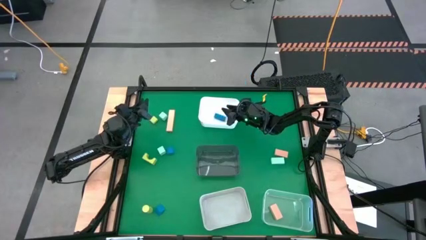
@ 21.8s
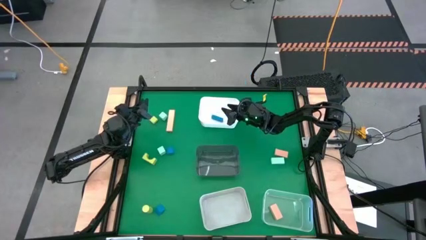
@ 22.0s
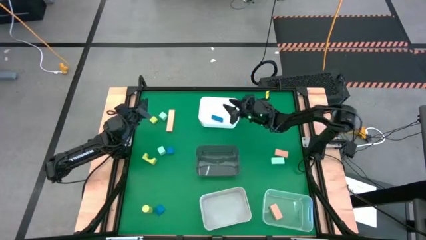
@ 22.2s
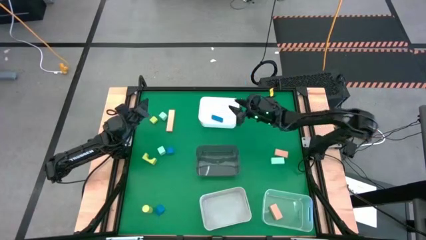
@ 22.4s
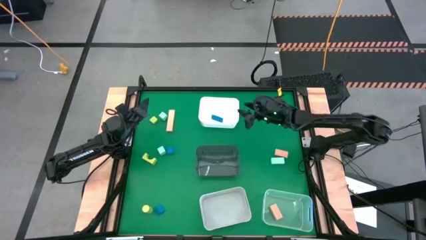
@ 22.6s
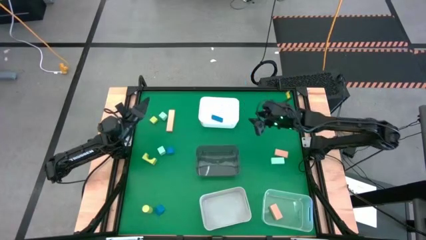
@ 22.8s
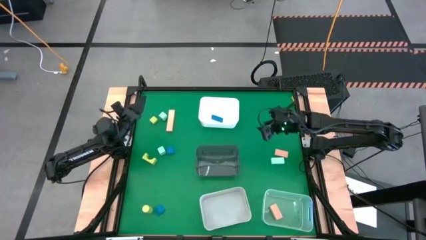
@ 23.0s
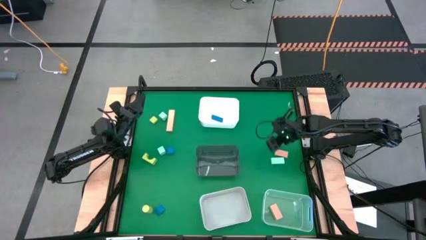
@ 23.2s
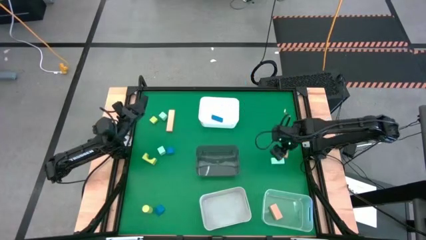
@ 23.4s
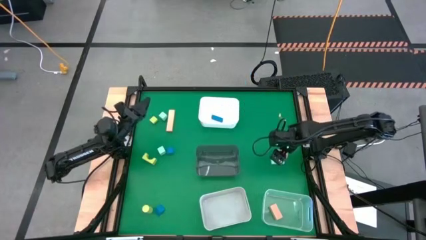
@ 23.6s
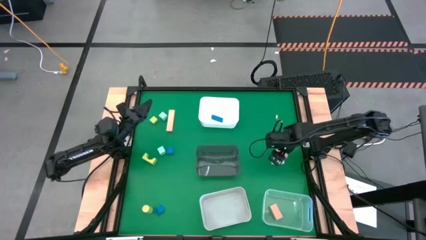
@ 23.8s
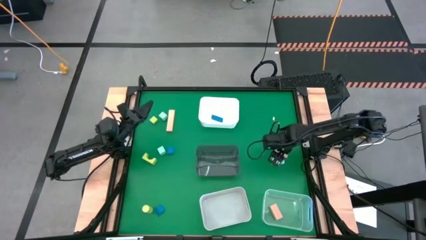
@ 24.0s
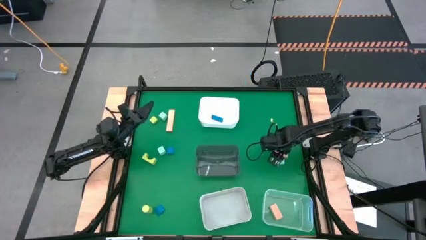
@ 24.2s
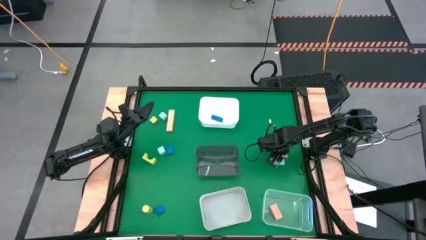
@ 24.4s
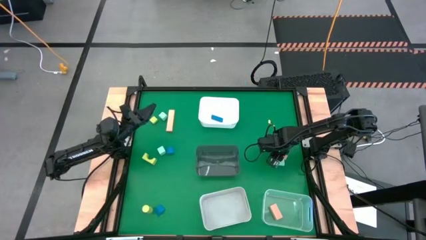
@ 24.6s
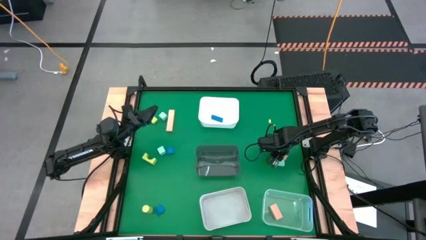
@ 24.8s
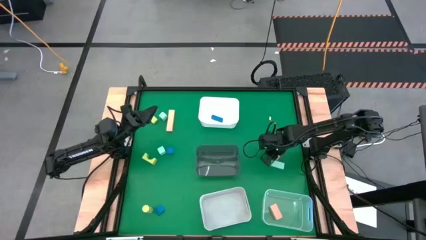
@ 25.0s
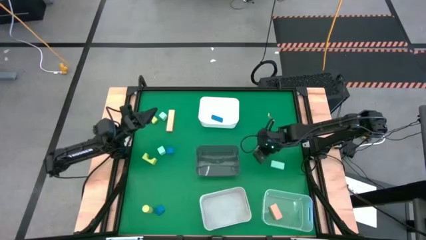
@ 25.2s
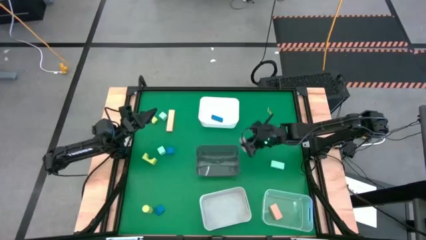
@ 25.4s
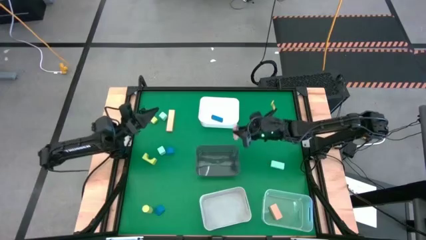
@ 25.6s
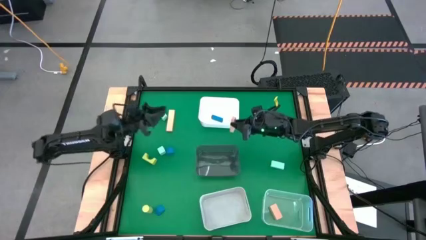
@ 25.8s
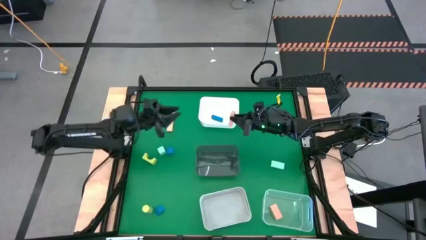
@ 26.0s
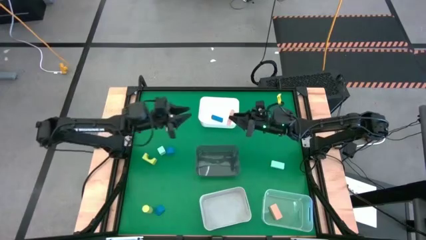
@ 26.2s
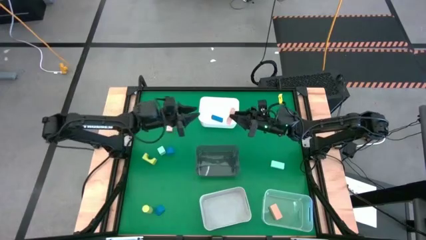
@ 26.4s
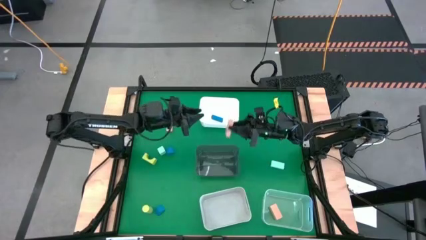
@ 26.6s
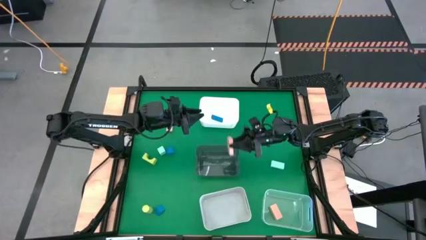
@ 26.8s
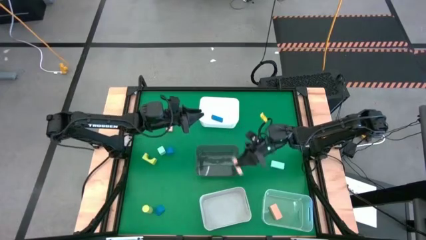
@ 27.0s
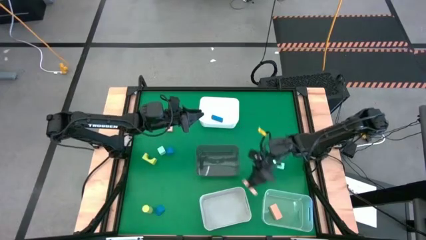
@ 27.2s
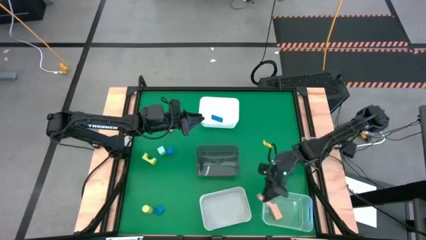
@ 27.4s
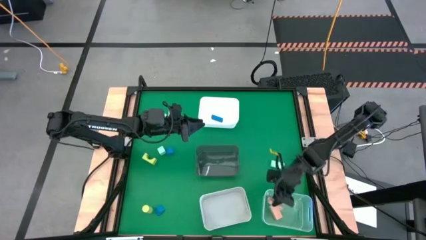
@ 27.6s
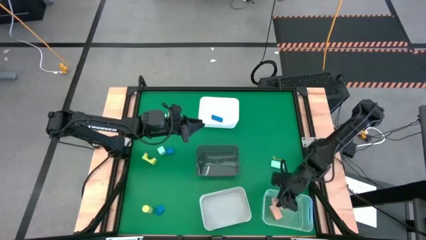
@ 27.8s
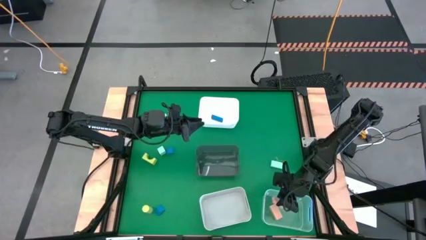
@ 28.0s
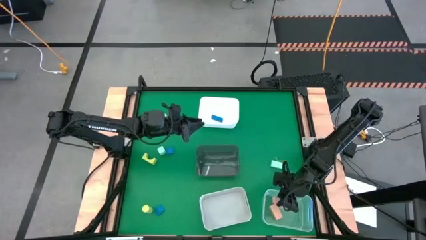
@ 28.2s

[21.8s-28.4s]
Task: Sort & place blocks by color
Put the bottom light brown block into the transparent bin

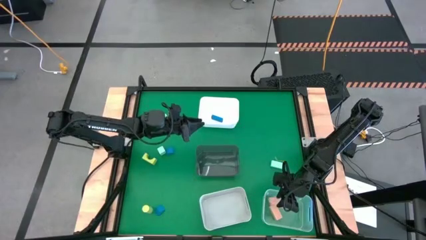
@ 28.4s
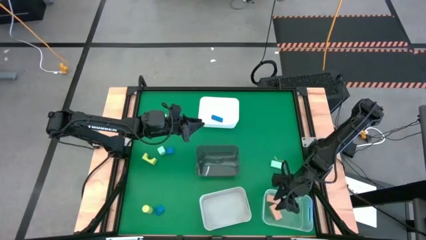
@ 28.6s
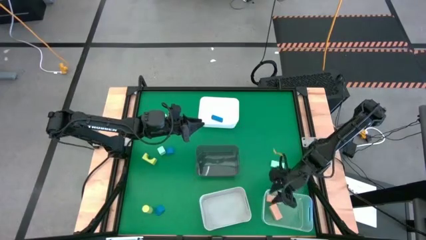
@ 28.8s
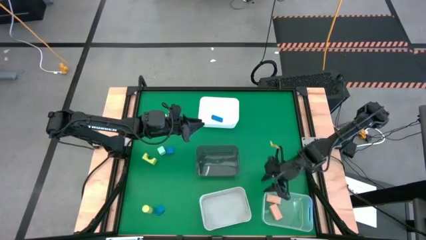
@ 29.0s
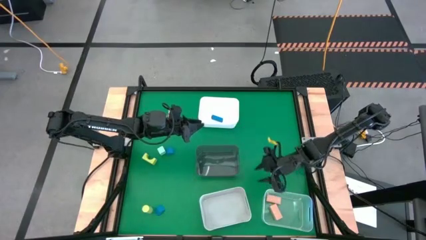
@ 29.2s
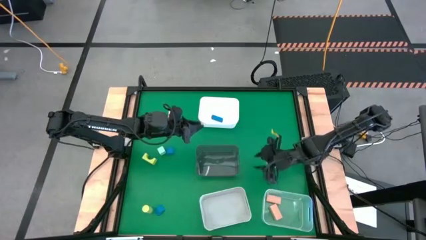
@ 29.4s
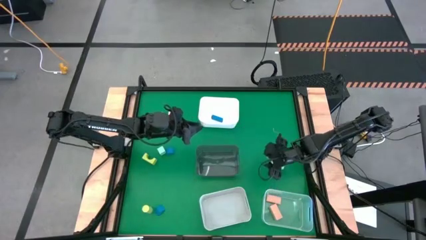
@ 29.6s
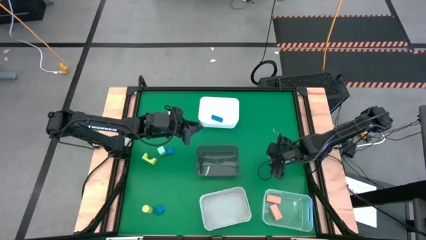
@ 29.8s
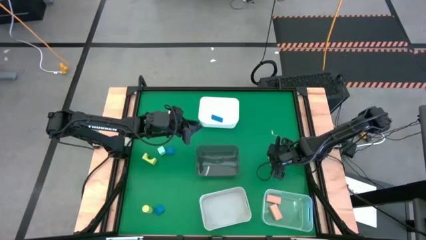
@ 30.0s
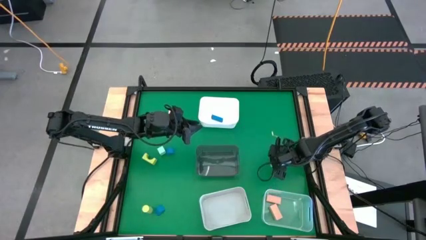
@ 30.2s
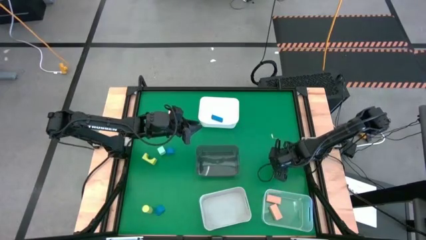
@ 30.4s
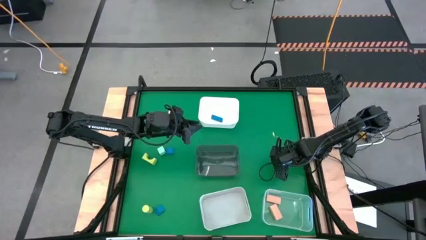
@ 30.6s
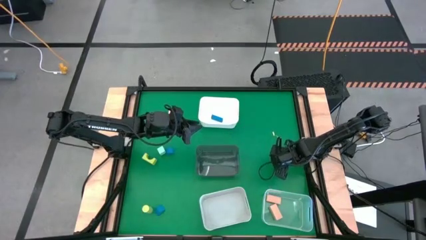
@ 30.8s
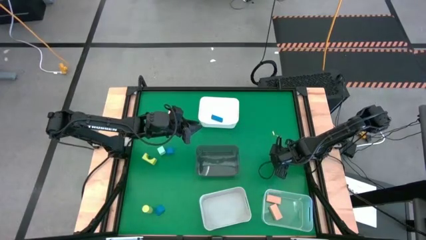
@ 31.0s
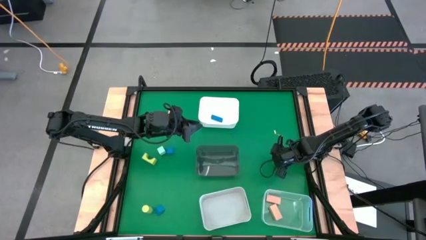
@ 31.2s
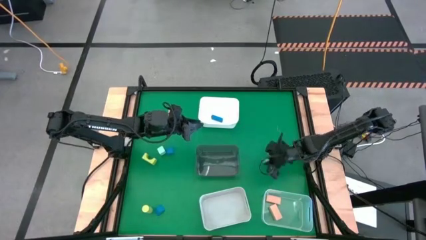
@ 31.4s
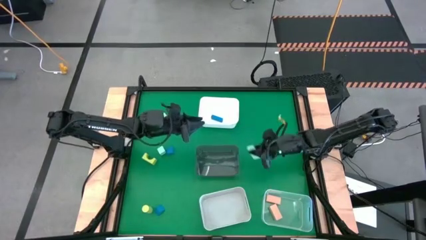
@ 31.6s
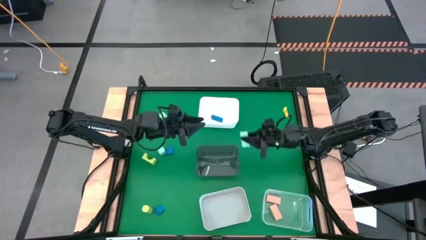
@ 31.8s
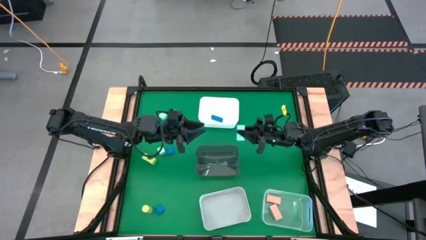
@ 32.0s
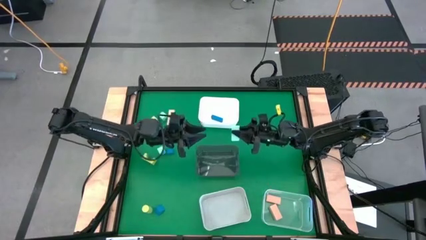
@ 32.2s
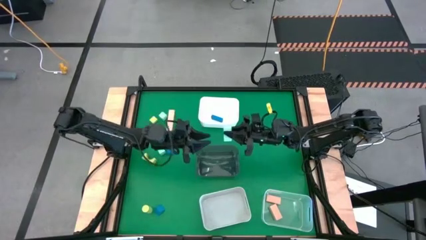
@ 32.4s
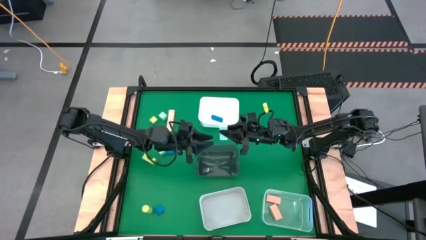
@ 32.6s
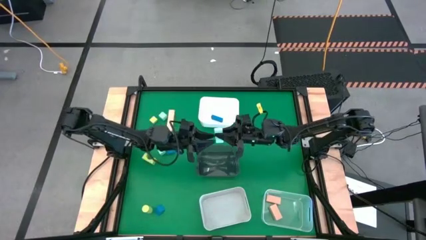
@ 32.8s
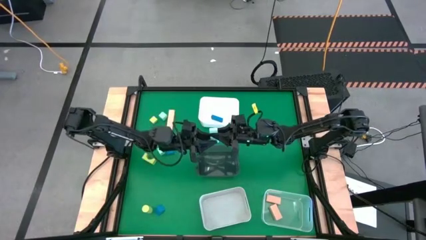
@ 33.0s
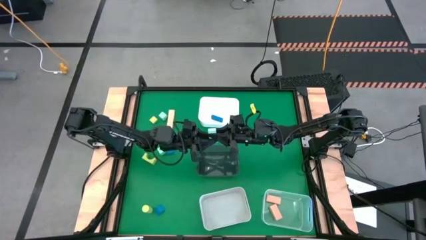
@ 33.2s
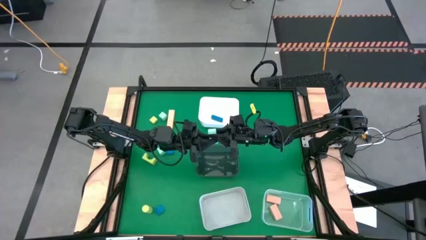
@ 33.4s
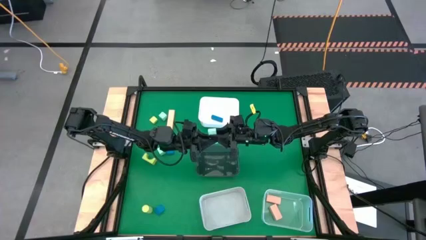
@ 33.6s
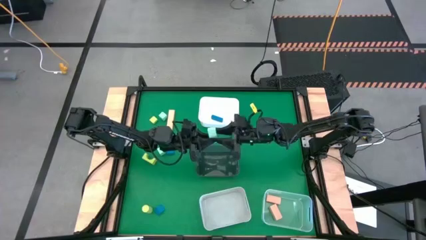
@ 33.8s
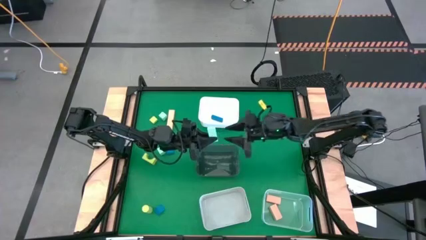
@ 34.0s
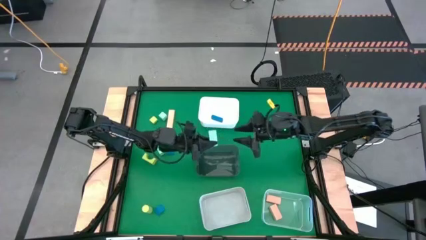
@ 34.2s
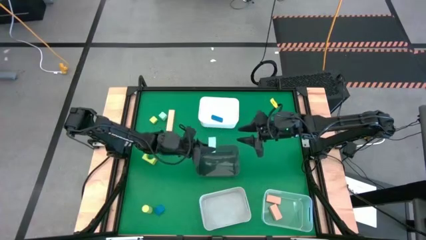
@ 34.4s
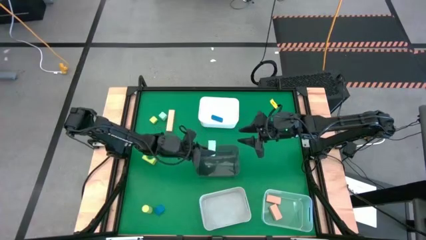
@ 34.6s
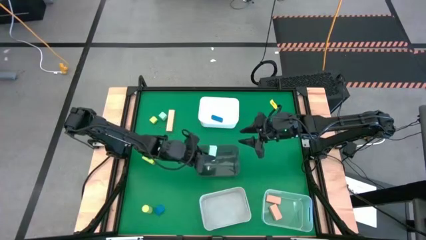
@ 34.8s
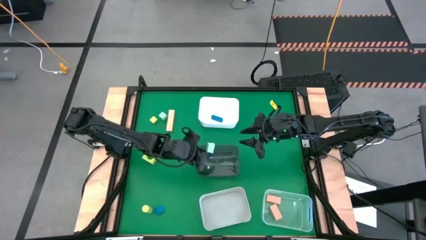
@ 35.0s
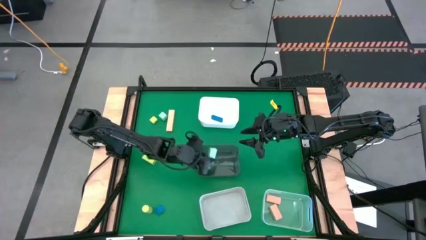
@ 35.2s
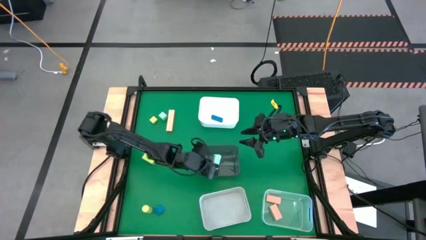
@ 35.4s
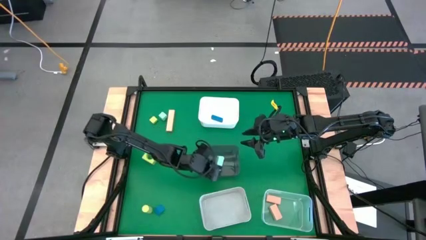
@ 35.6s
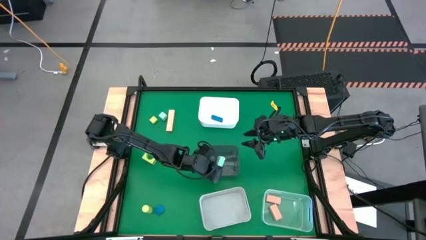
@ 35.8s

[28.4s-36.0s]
Put the bottom right light blue block into the black bin
